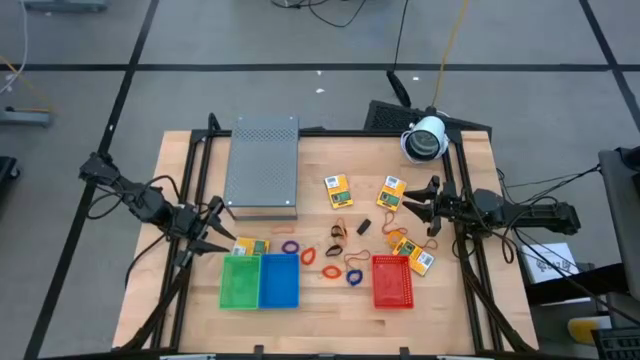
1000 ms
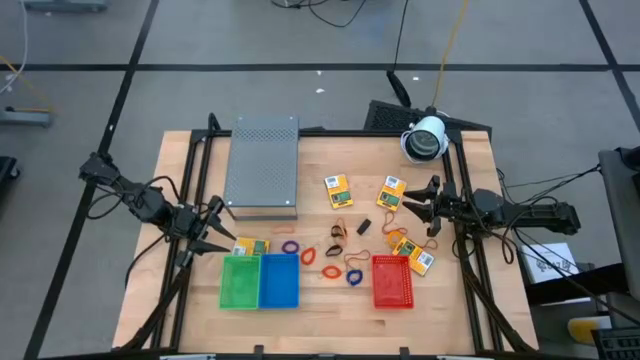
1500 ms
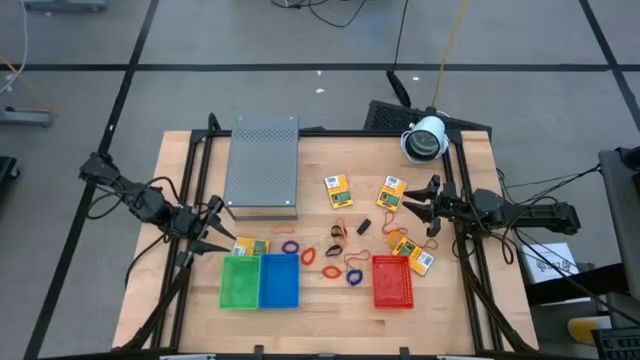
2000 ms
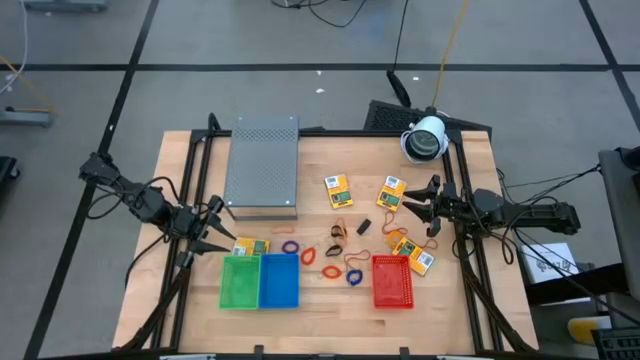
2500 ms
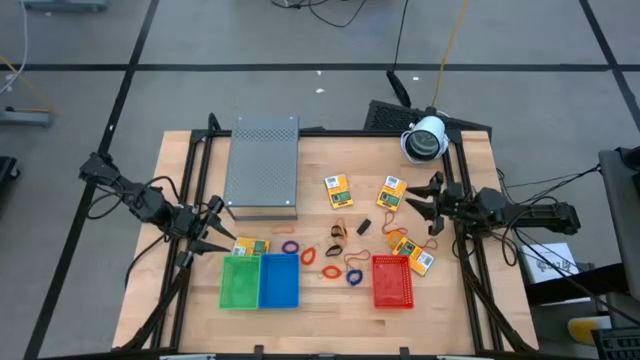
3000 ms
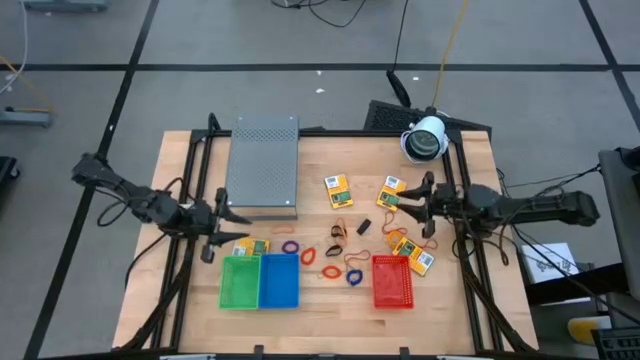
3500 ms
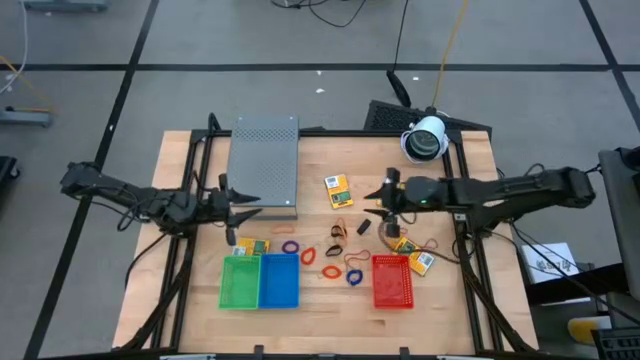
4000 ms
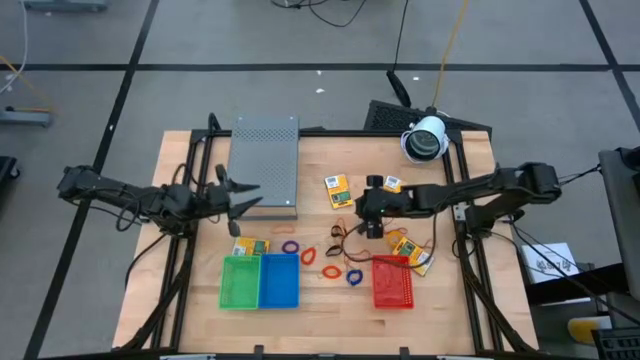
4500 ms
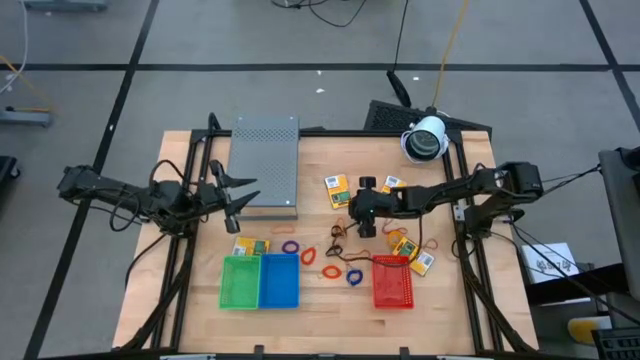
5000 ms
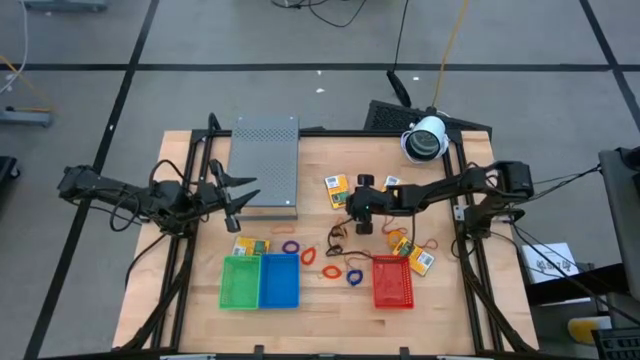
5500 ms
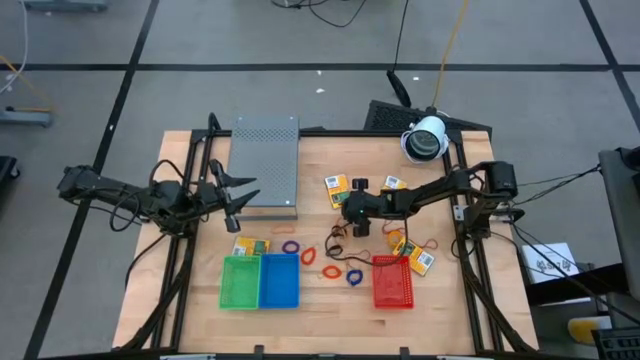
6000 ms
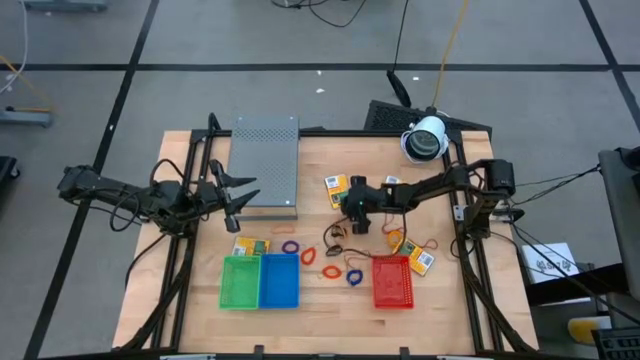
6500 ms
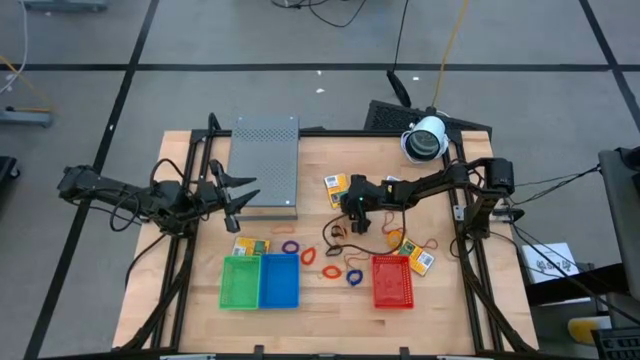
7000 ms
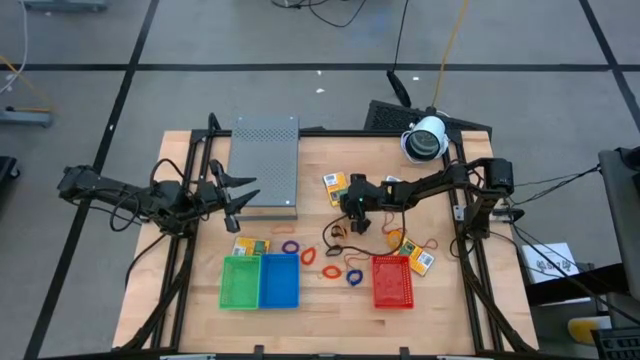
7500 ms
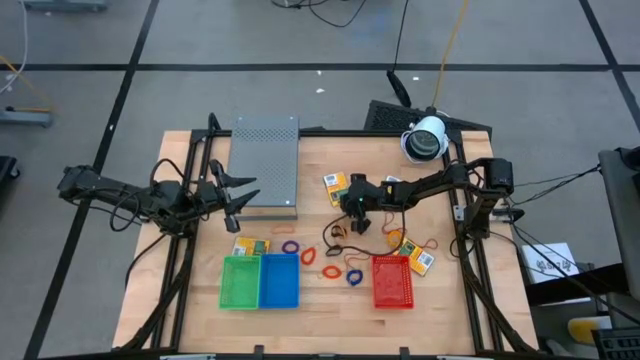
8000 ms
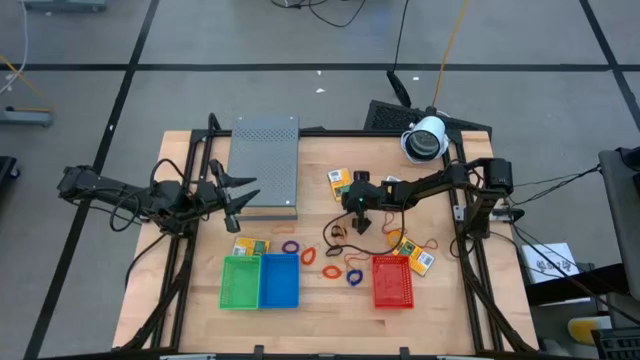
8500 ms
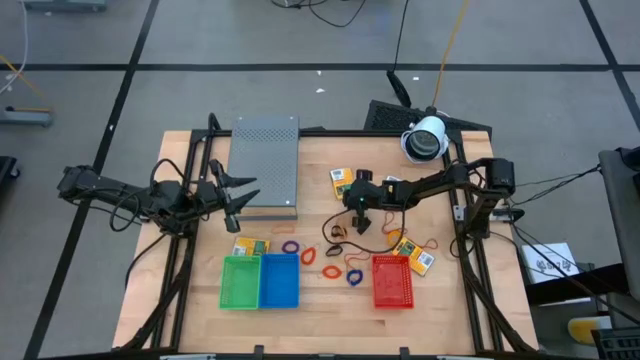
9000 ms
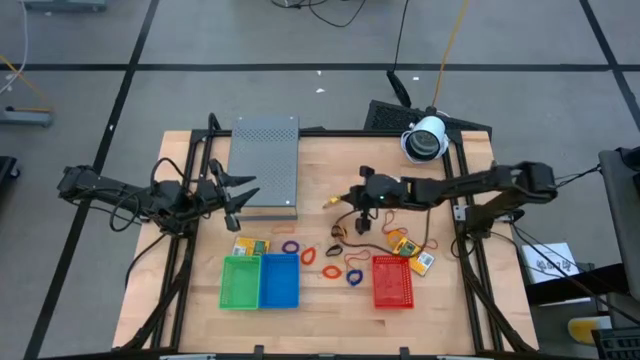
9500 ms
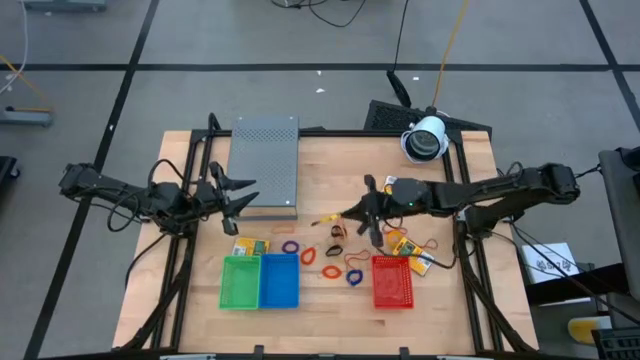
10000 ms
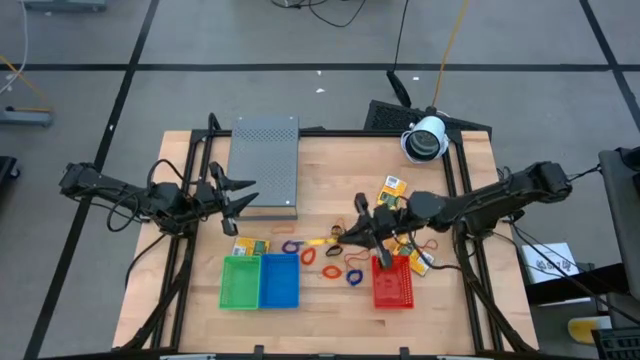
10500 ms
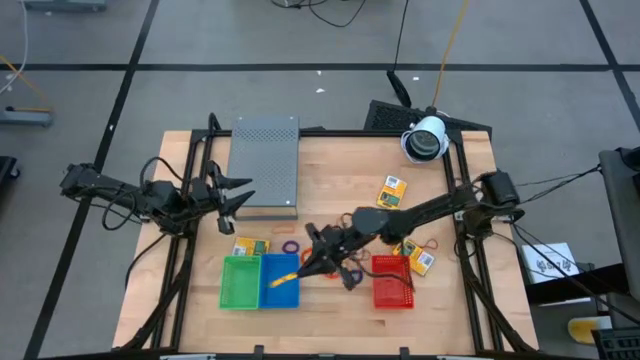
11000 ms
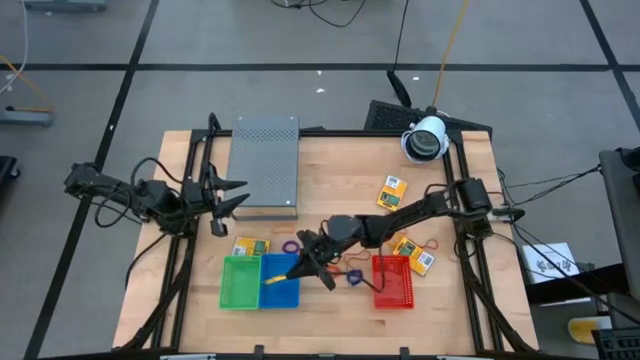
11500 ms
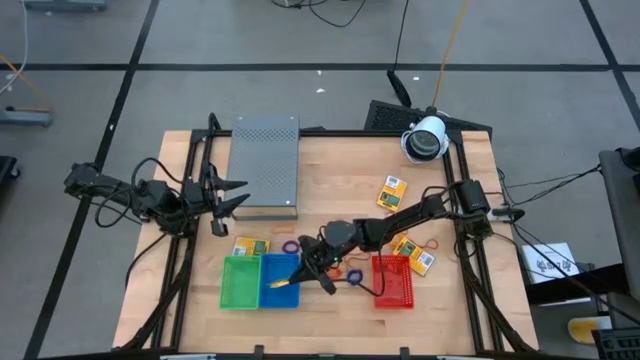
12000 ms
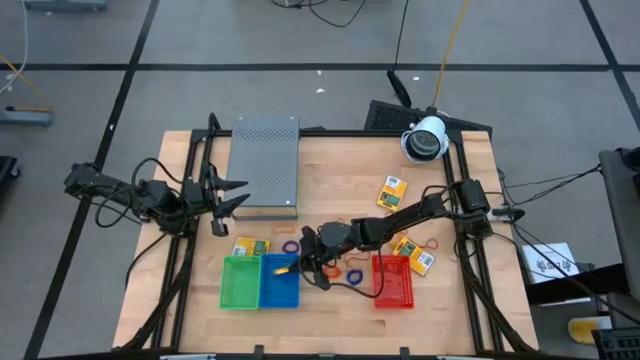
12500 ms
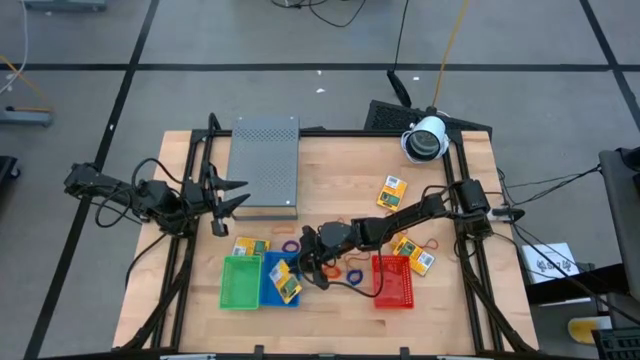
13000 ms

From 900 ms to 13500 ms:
Task: Pick & Place Office Desk Supplies
Put the crayon into the blue bin

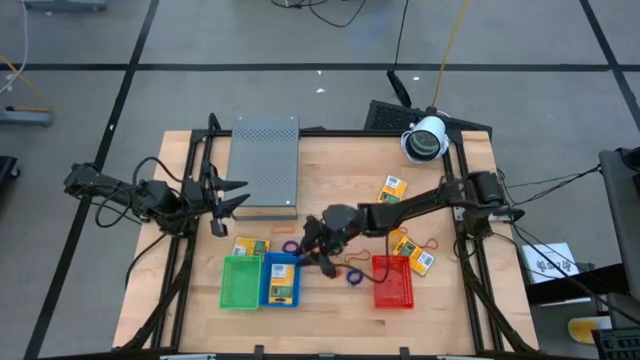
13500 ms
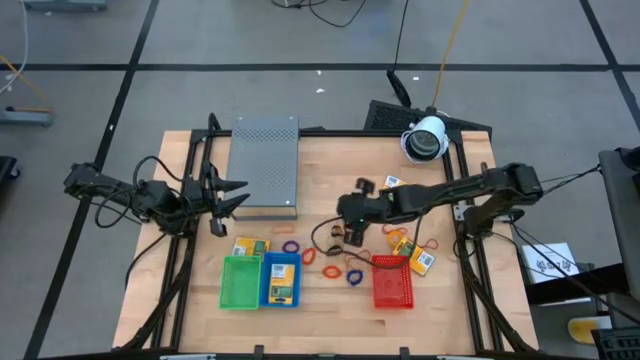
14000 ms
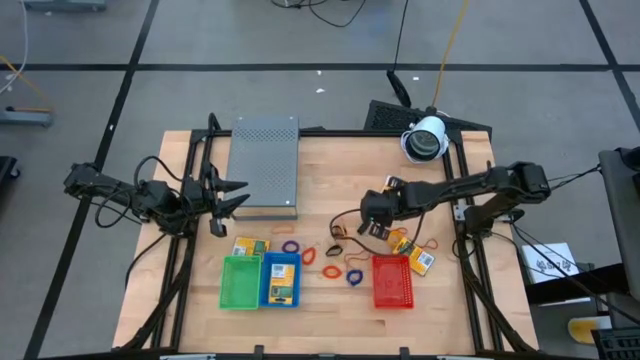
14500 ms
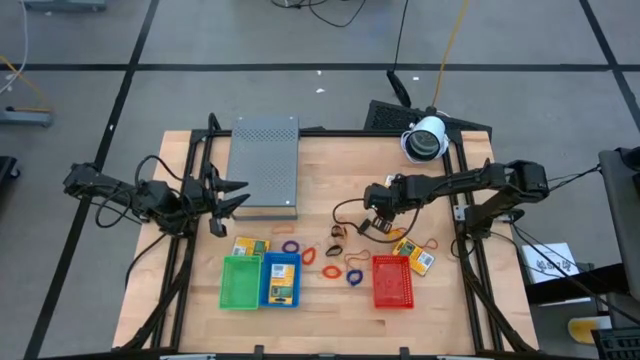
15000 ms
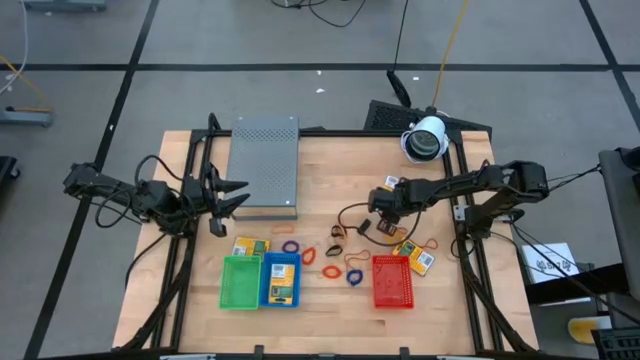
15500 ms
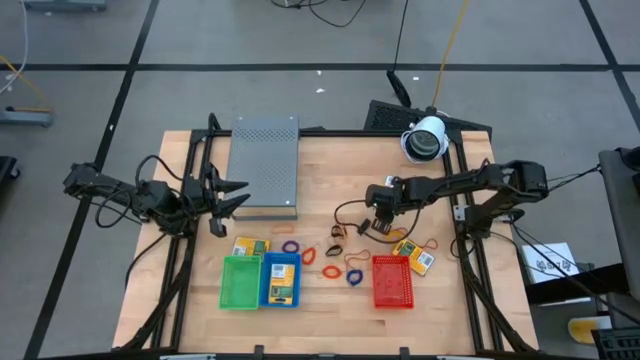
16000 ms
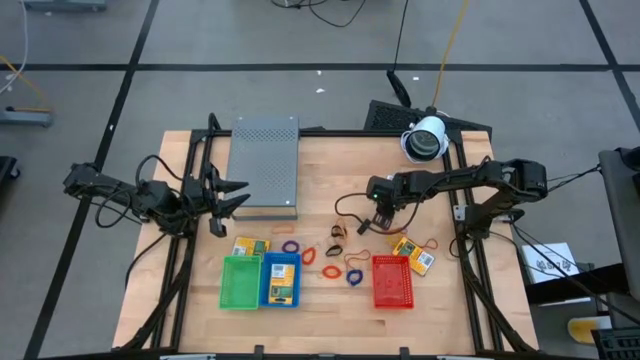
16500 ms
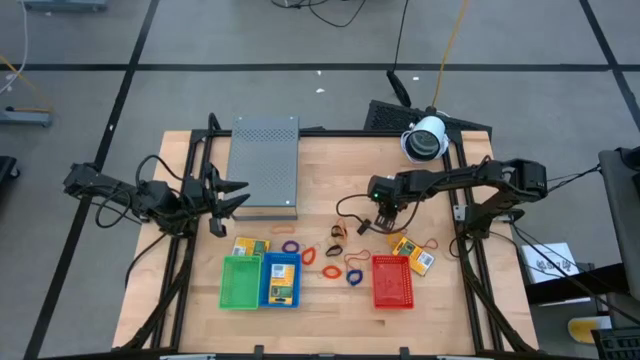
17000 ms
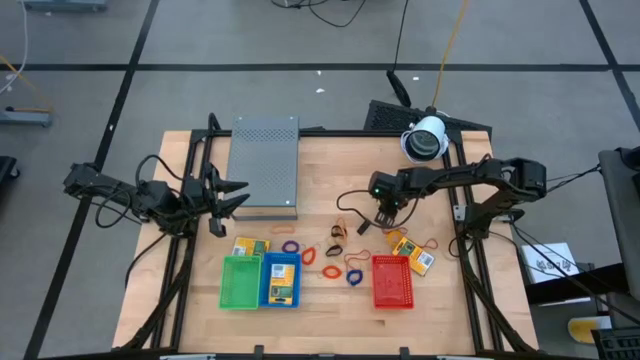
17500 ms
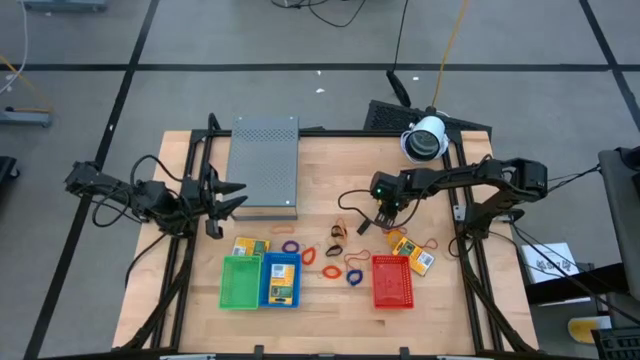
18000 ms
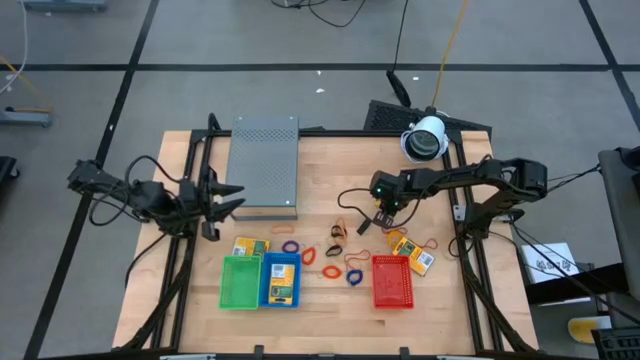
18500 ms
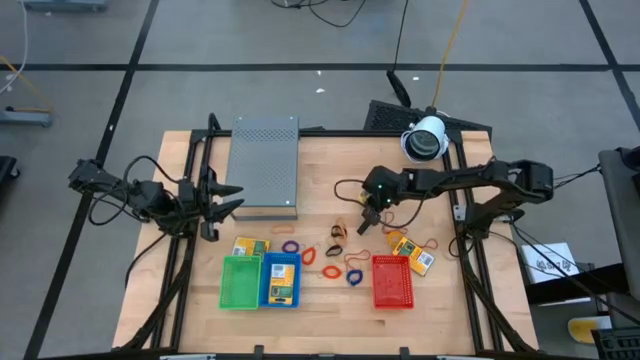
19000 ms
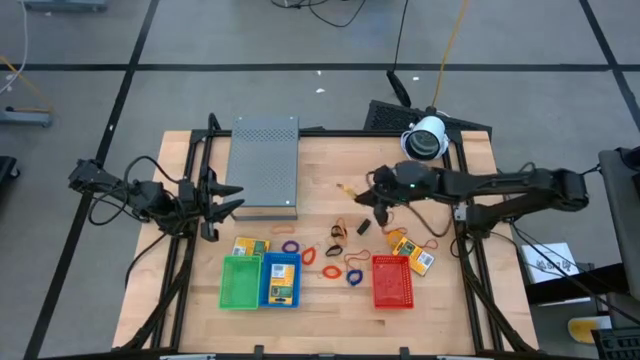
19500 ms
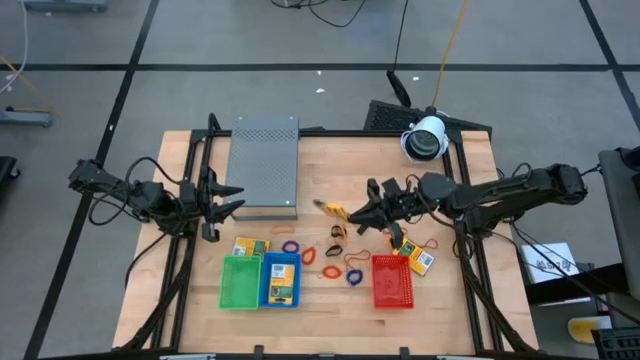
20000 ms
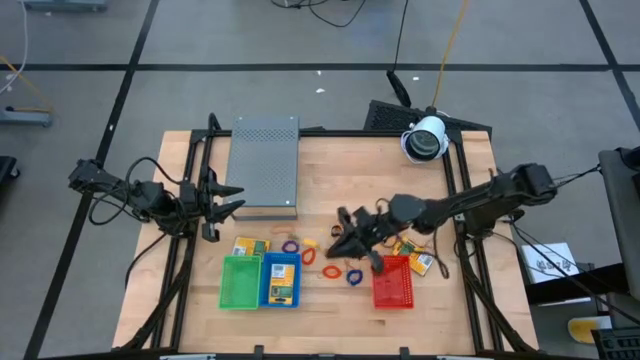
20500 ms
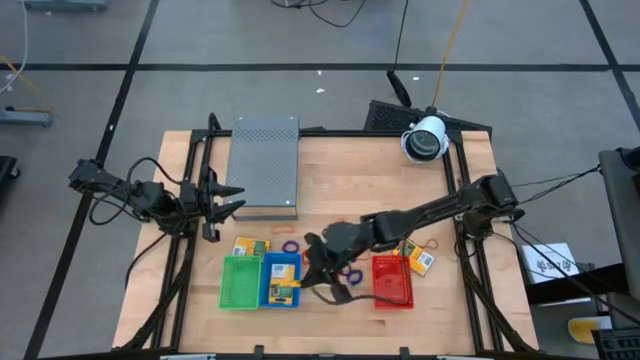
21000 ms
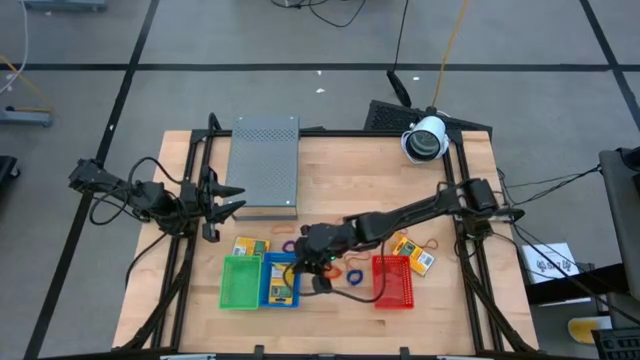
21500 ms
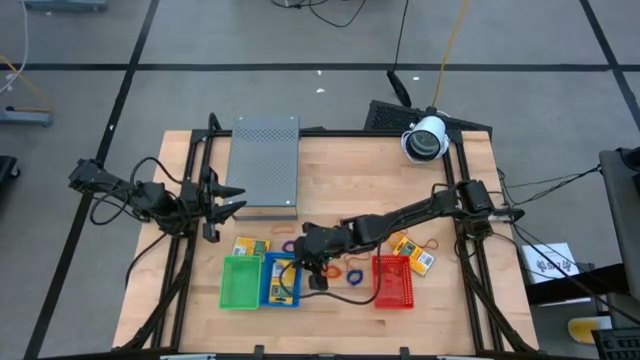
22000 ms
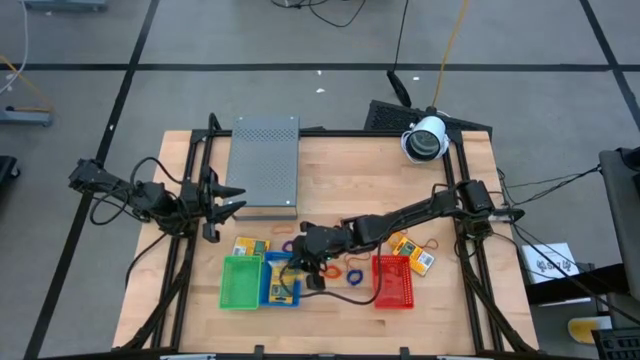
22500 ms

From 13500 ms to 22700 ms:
Put the crayon into the middle blue bin
